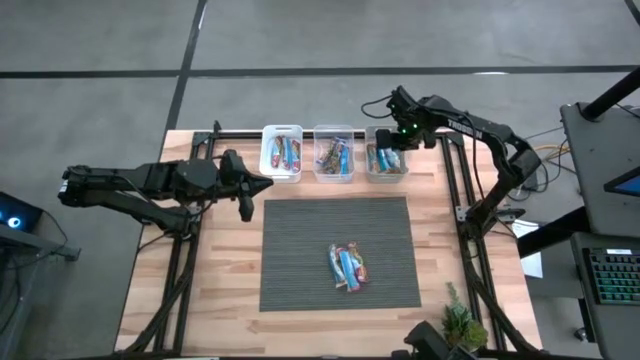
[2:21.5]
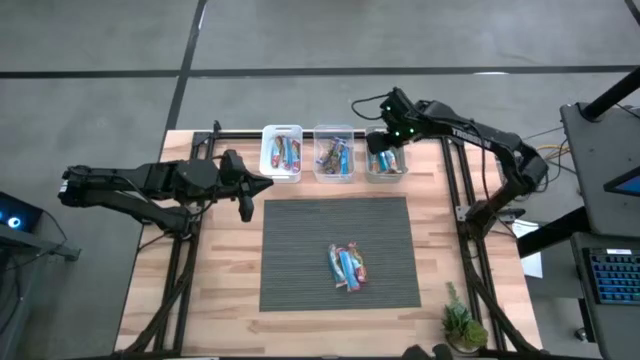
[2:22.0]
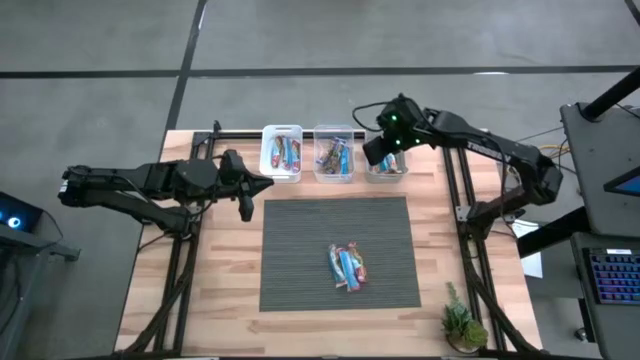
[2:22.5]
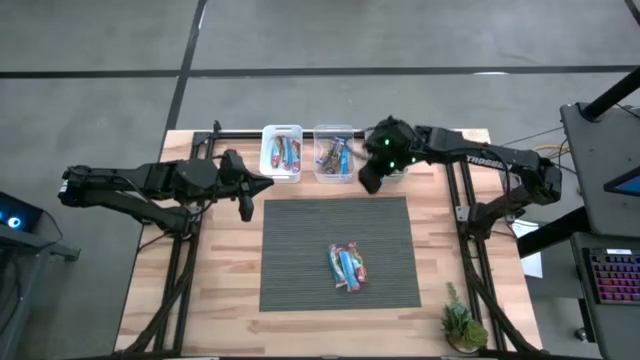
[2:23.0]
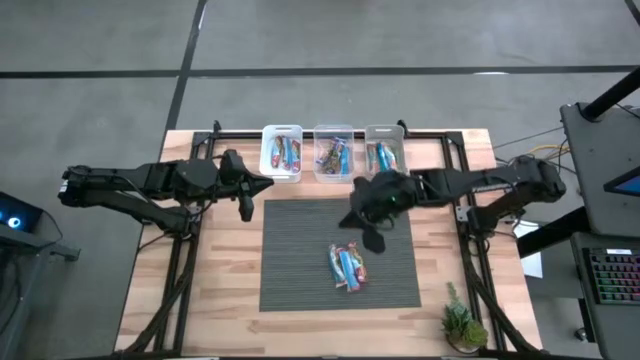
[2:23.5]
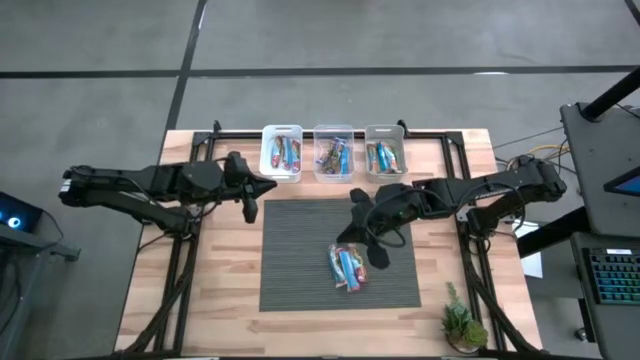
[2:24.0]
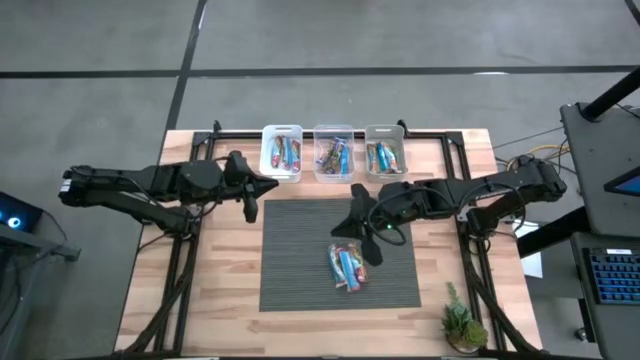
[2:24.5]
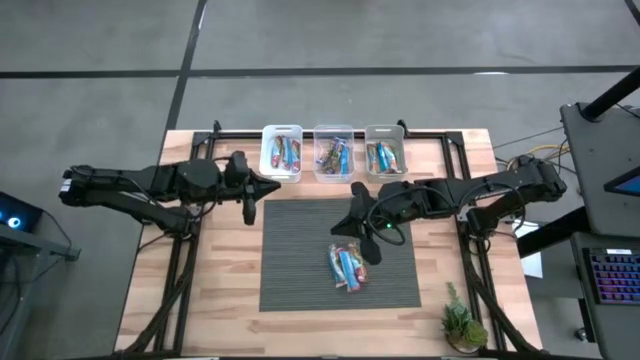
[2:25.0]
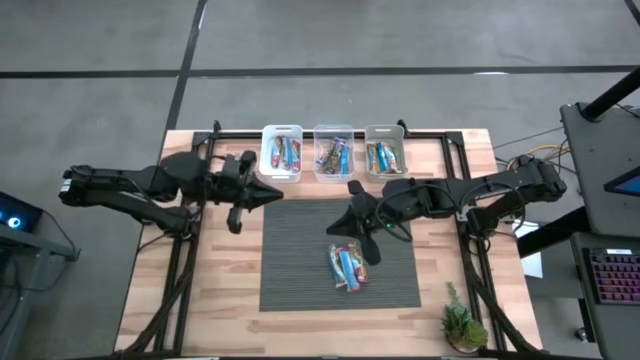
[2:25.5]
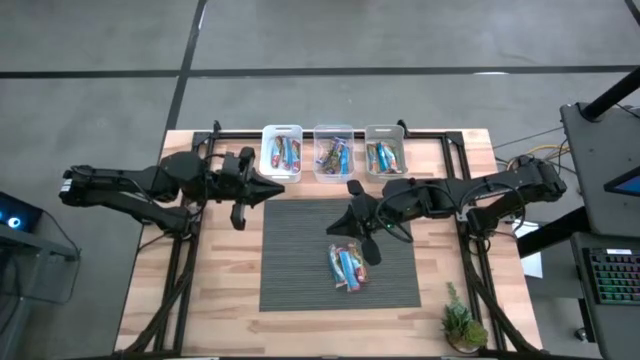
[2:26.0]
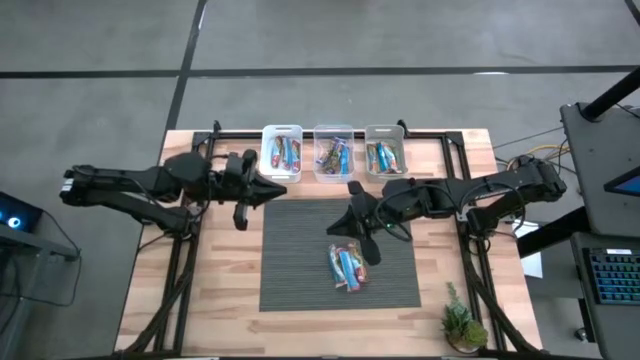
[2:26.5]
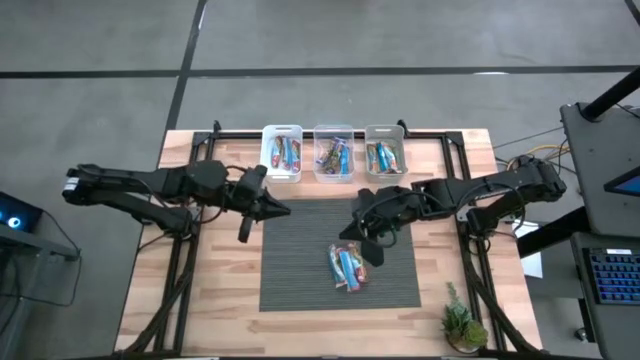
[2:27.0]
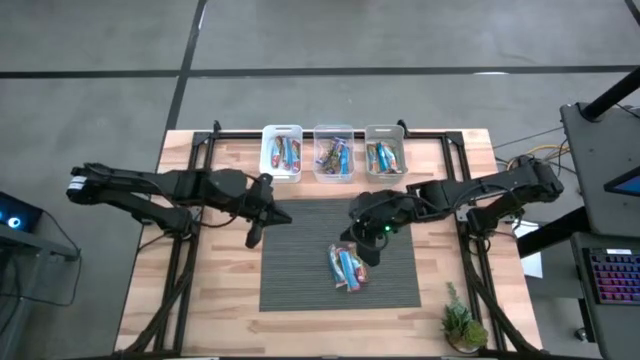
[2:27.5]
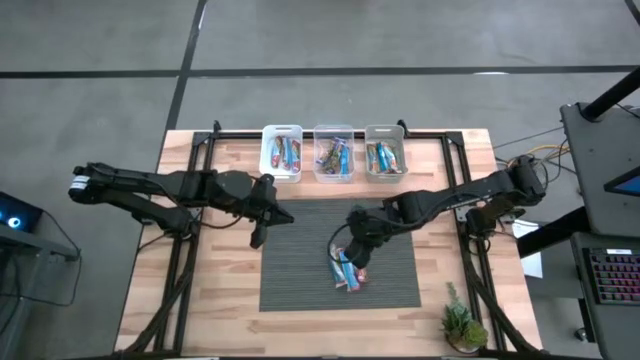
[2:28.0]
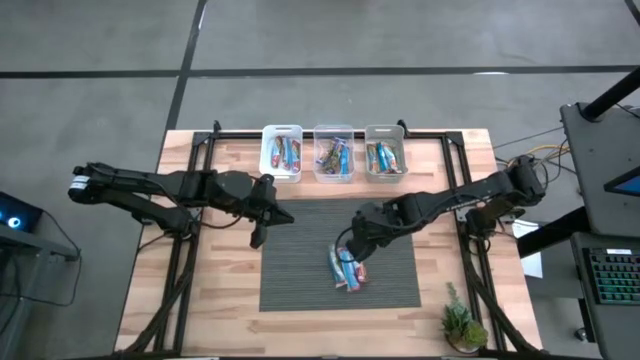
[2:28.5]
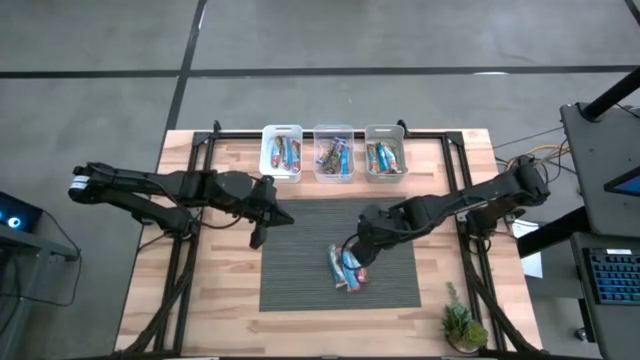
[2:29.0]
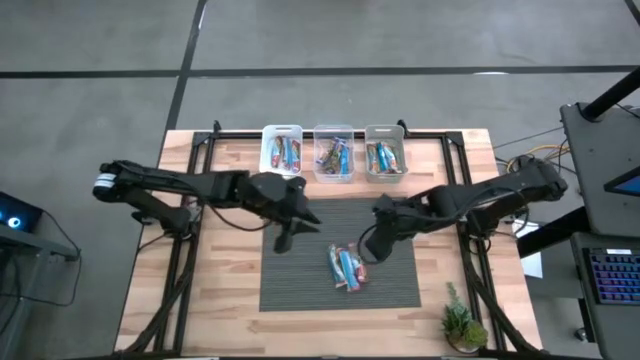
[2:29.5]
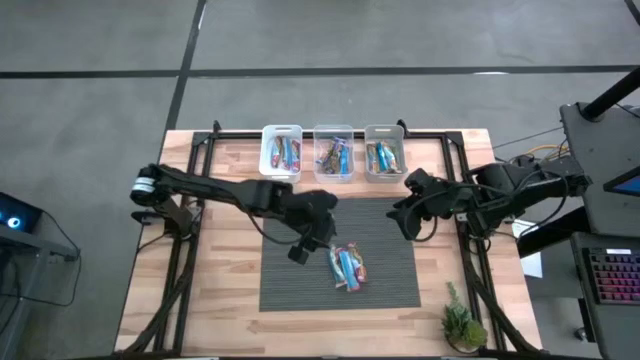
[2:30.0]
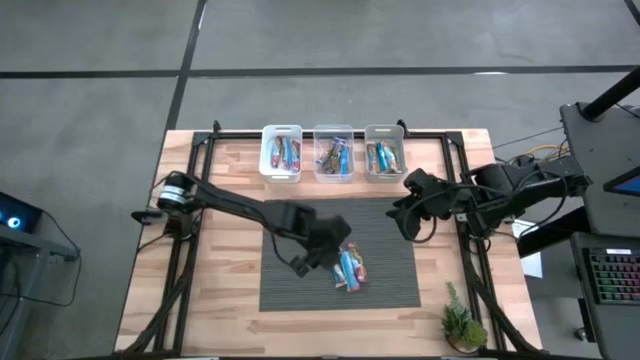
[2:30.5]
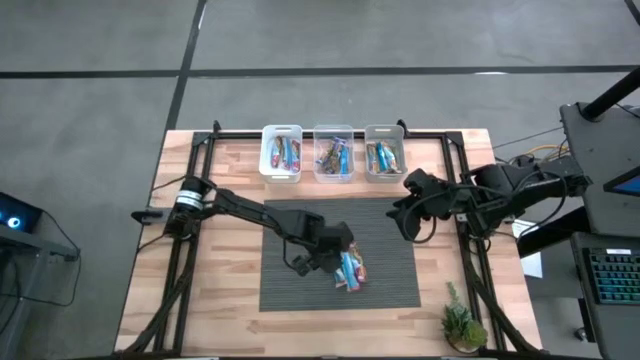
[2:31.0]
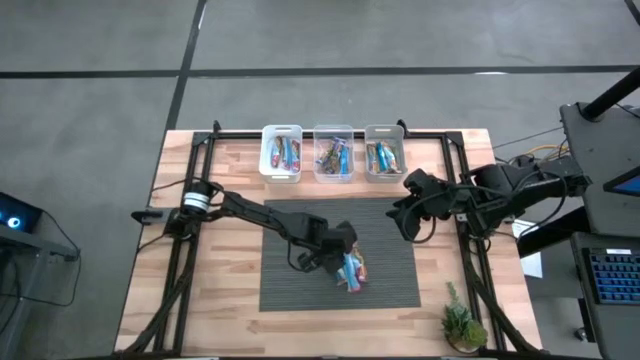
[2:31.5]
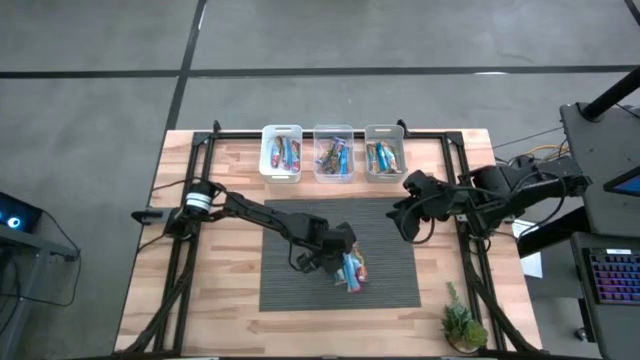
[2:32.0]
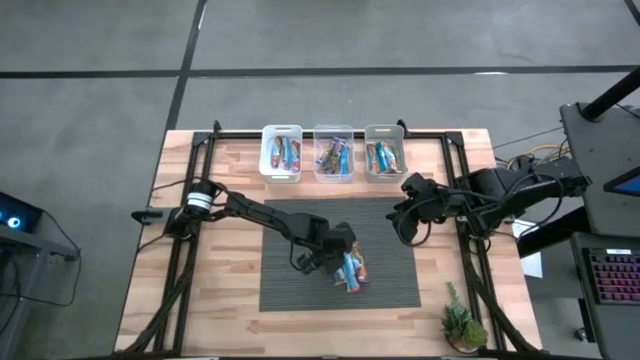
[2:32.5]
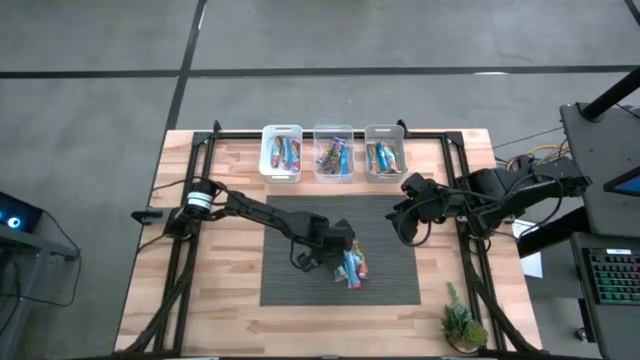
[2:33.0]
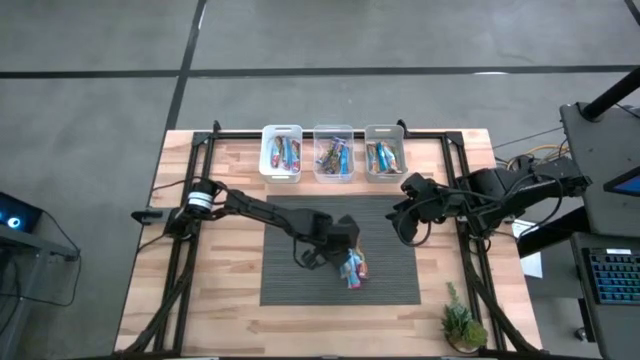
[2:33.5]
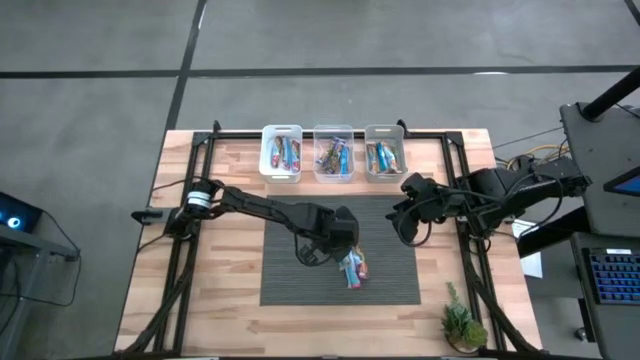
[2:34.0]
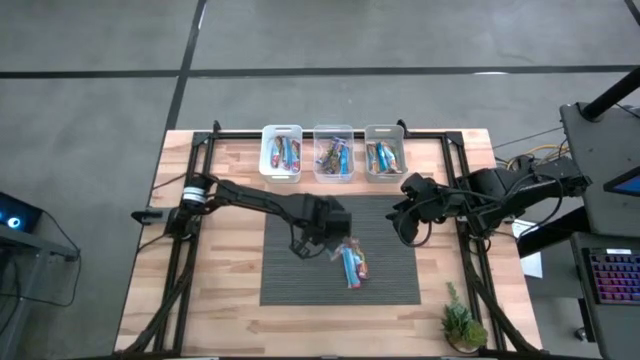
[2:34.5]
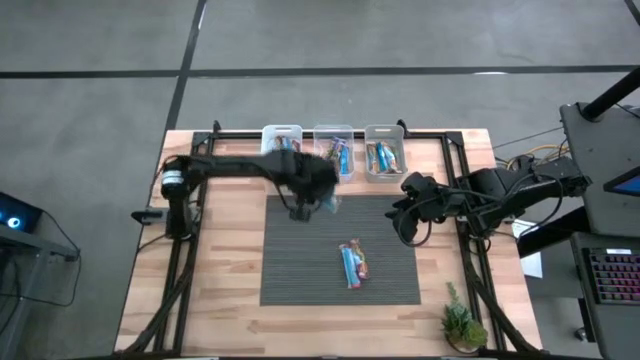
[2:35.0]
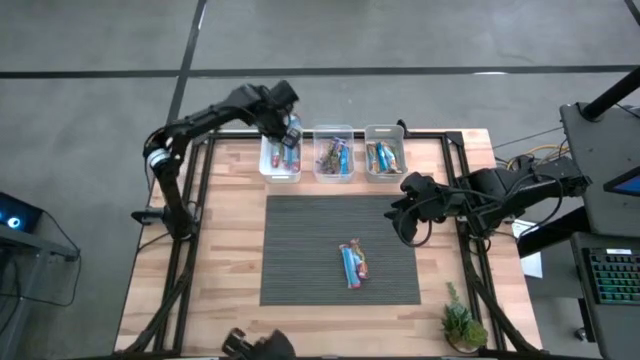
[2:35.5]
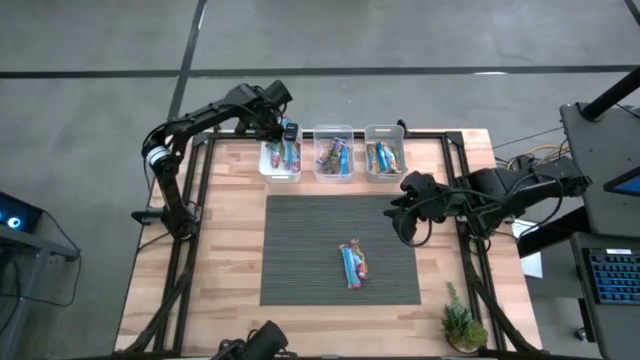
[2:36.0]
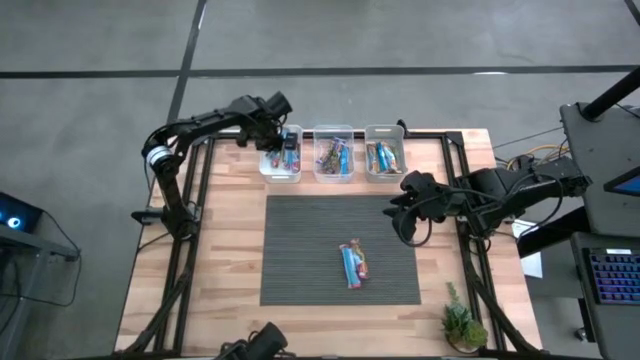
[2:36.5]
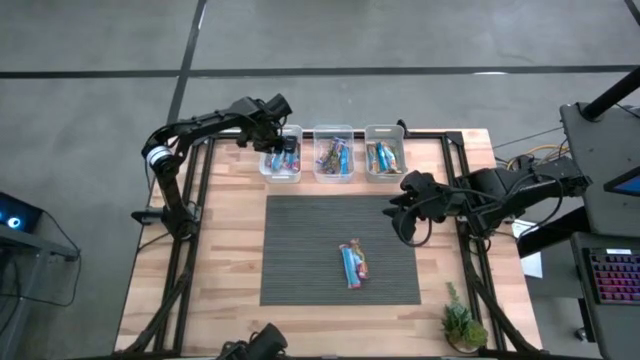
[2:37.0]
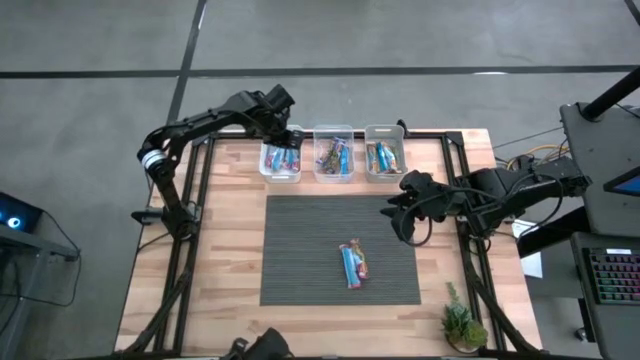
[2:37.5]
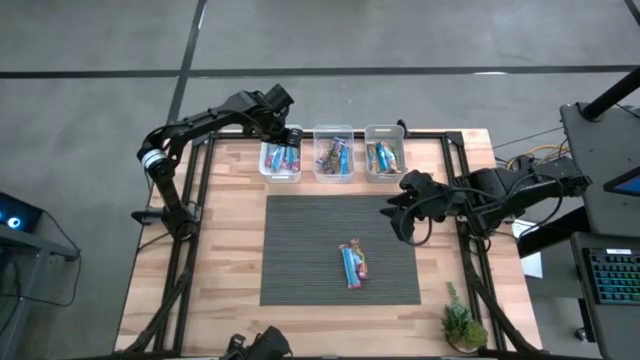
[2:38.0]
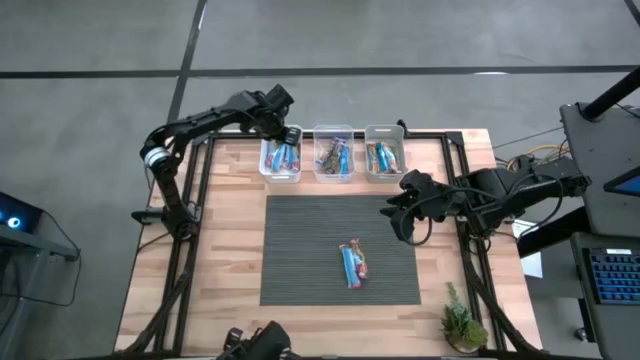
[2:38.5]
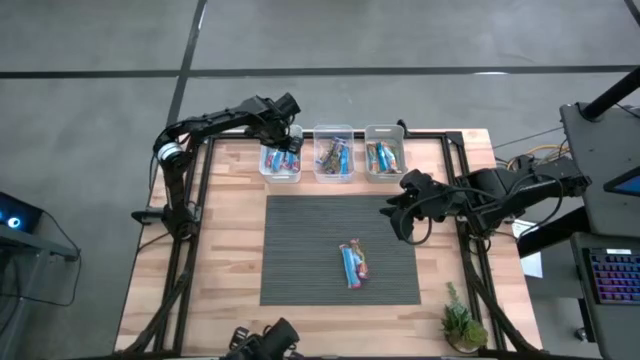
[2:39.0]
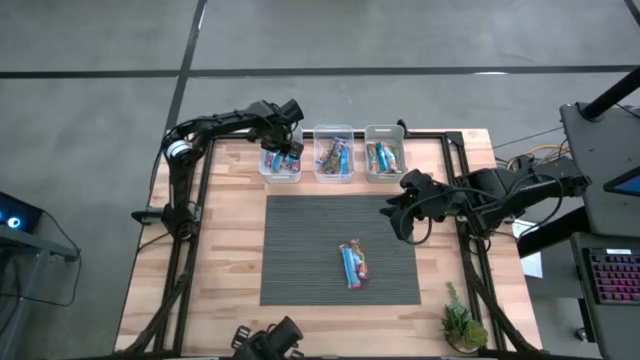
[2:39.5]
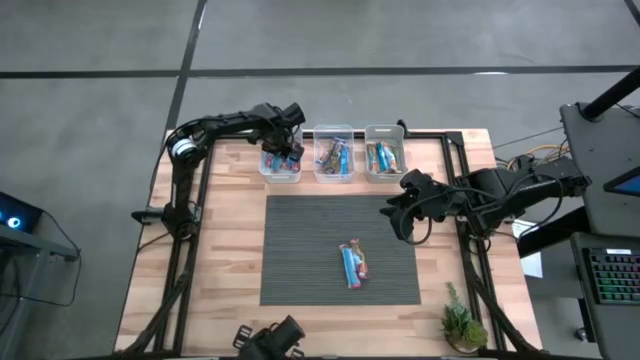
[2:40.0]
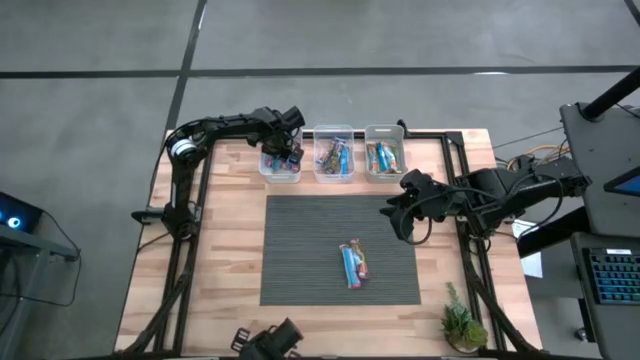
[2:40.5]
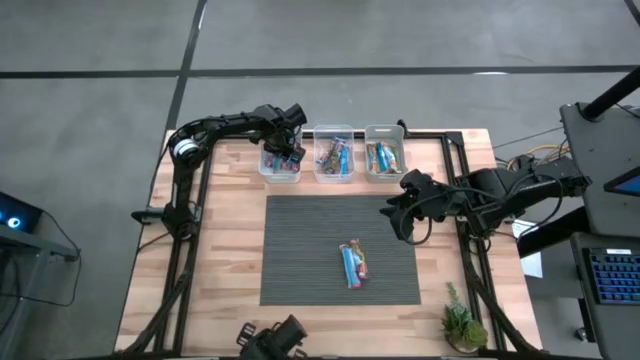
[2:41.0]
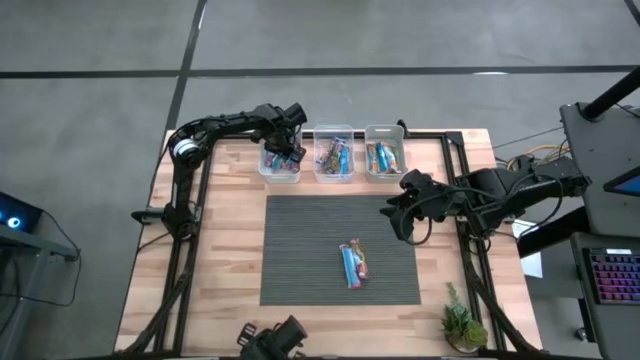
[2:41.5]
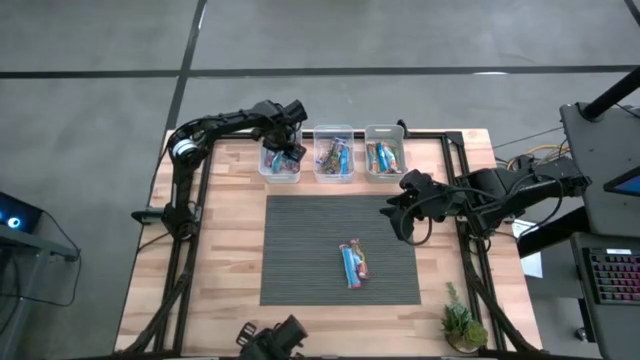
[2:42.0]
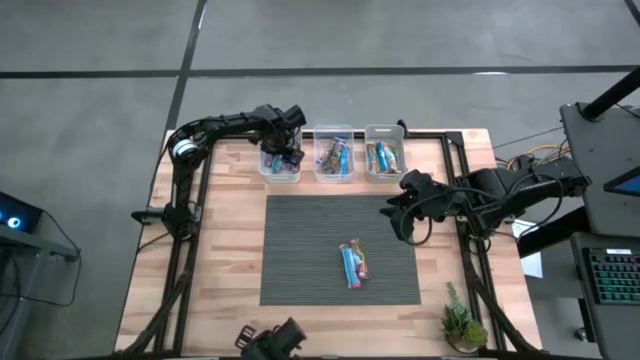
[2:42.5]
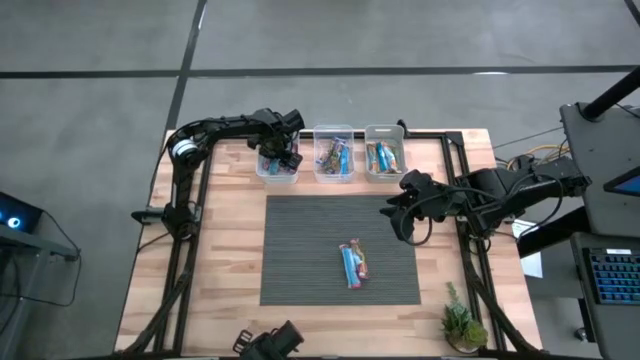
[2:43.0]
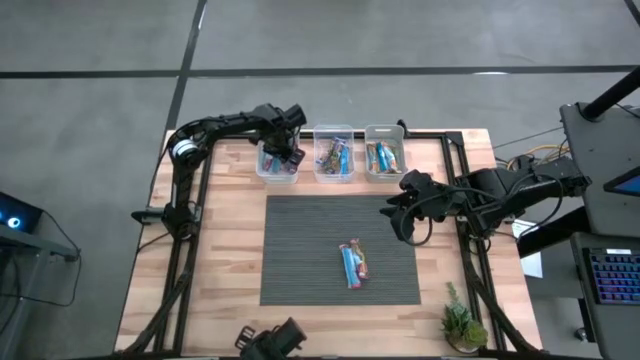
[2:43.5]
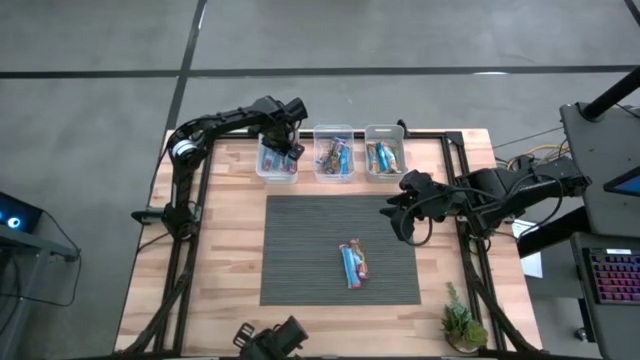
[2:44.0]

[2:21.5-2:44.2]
Task: Pick and place Granola Bars by type
Put the yellow granola bar into the white bin
